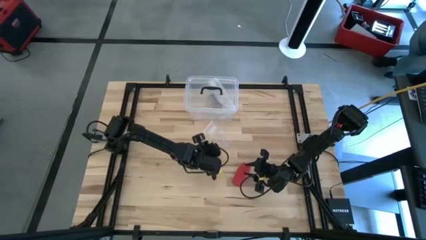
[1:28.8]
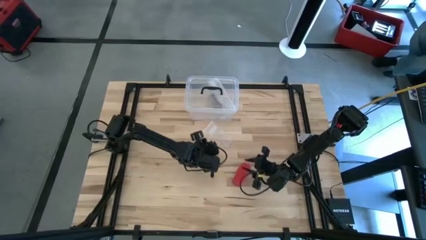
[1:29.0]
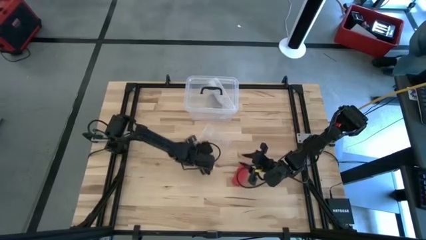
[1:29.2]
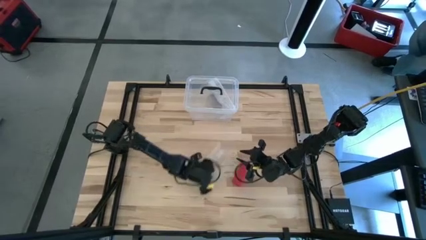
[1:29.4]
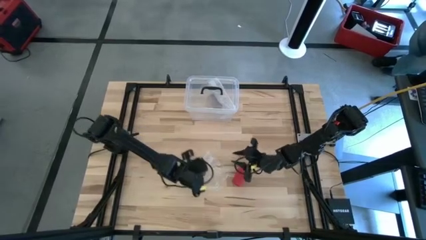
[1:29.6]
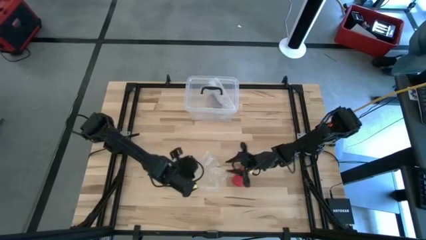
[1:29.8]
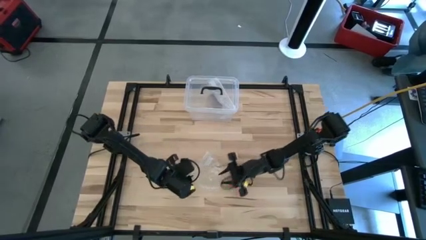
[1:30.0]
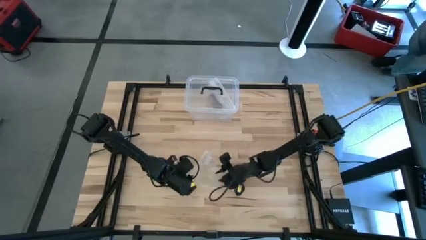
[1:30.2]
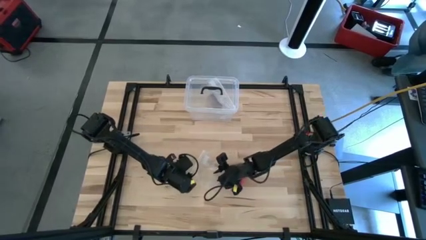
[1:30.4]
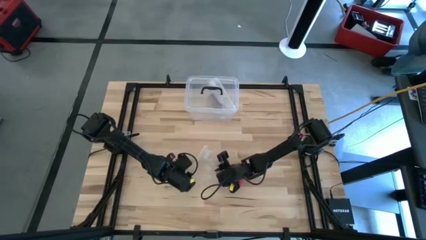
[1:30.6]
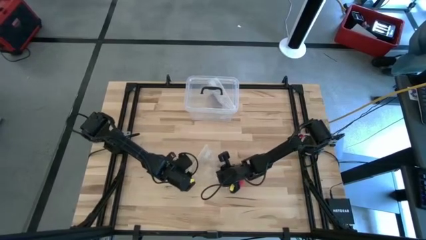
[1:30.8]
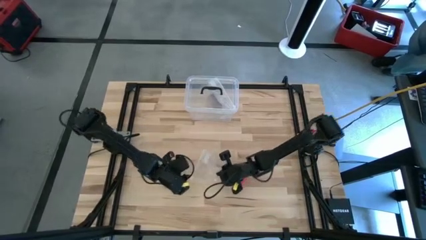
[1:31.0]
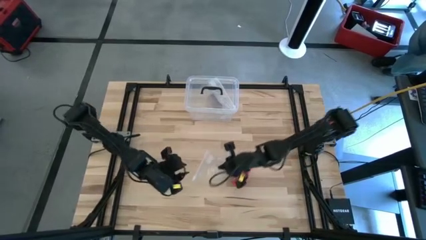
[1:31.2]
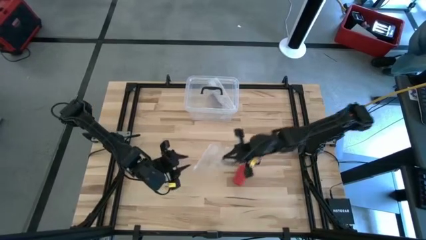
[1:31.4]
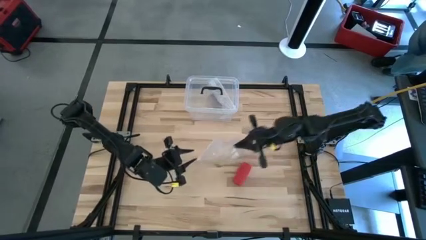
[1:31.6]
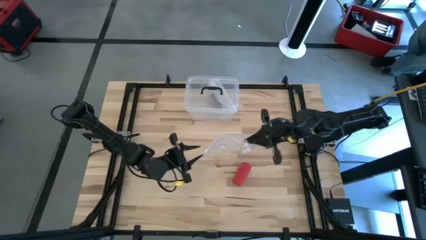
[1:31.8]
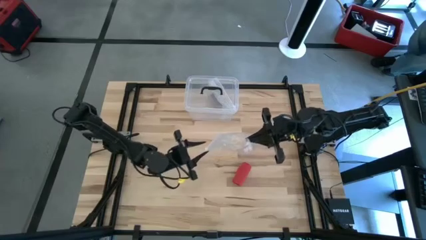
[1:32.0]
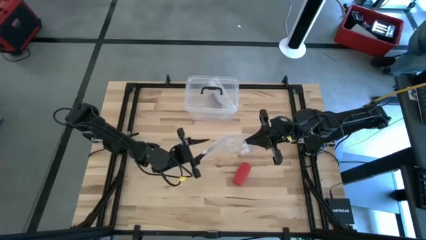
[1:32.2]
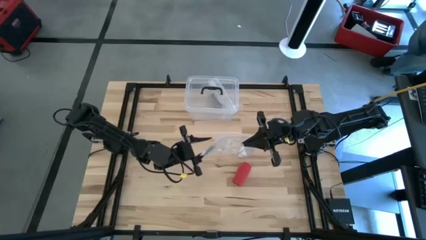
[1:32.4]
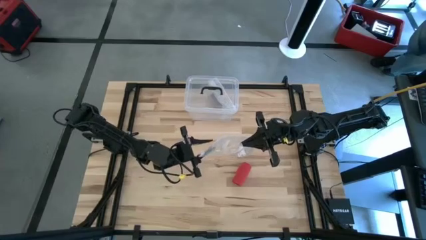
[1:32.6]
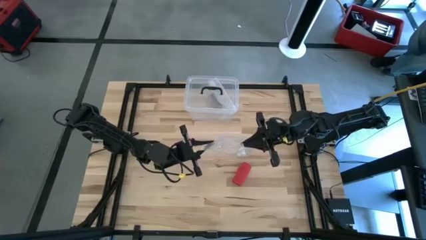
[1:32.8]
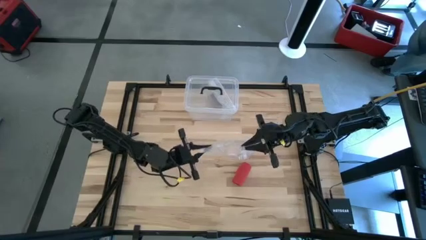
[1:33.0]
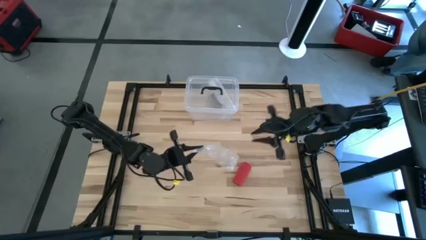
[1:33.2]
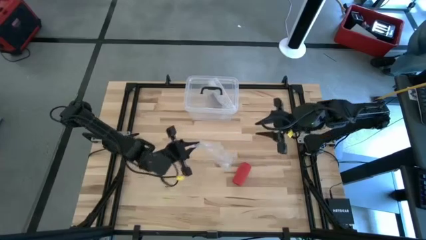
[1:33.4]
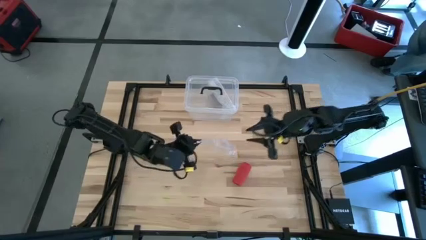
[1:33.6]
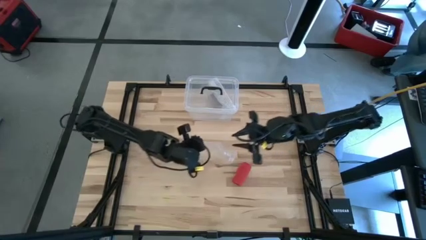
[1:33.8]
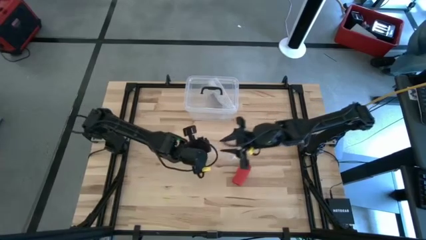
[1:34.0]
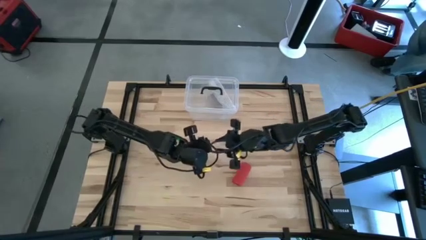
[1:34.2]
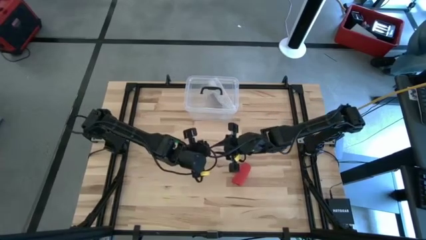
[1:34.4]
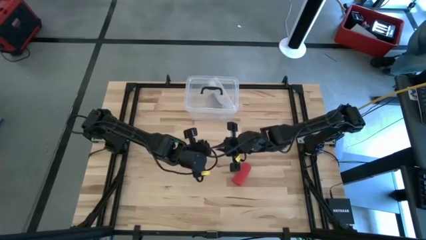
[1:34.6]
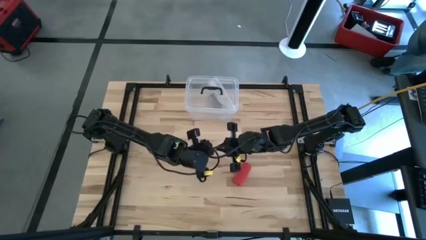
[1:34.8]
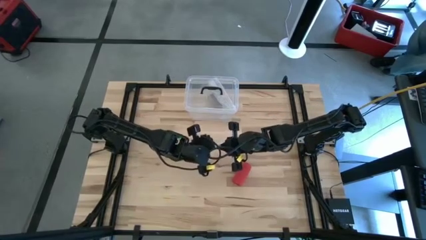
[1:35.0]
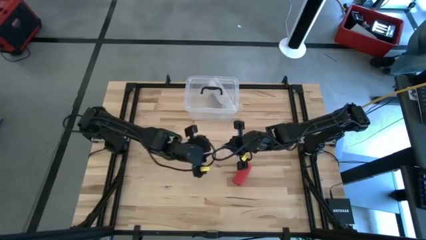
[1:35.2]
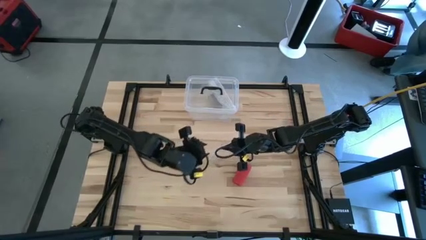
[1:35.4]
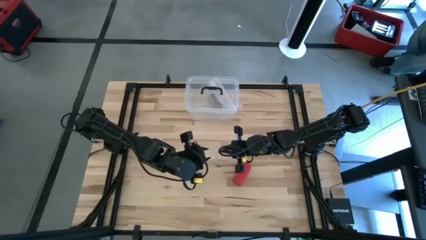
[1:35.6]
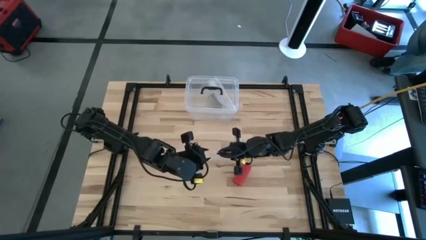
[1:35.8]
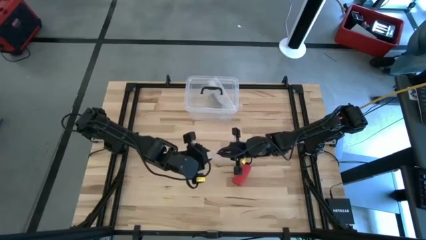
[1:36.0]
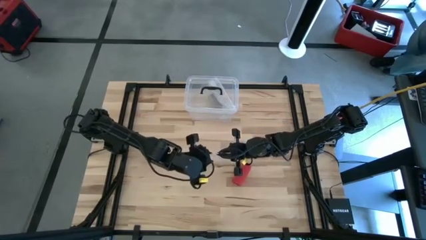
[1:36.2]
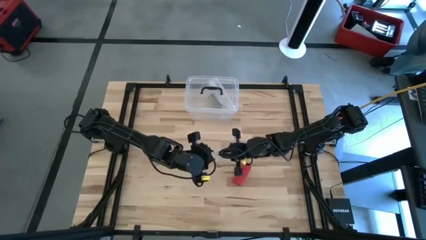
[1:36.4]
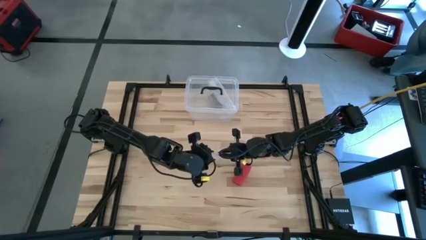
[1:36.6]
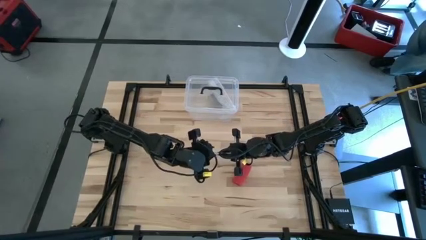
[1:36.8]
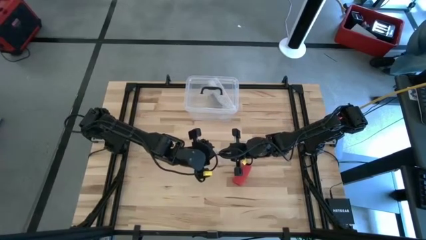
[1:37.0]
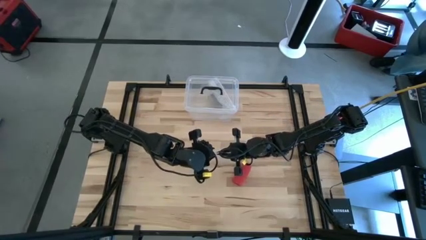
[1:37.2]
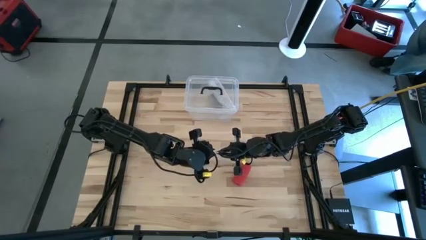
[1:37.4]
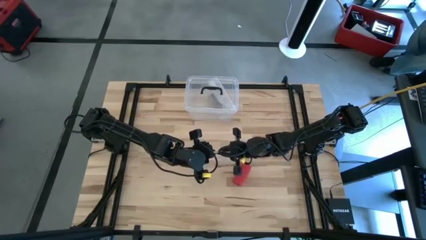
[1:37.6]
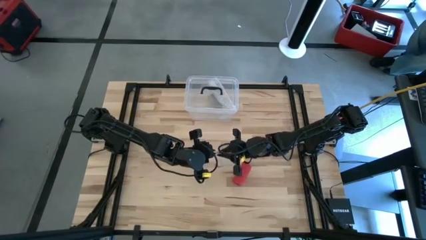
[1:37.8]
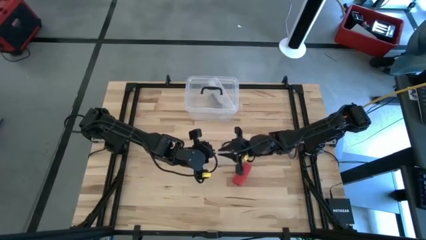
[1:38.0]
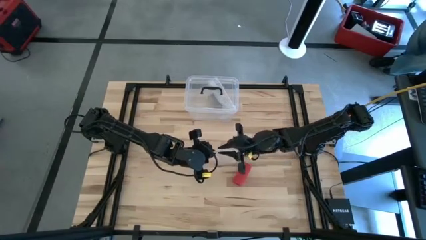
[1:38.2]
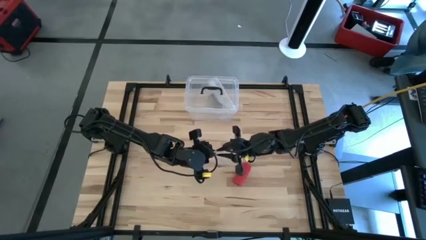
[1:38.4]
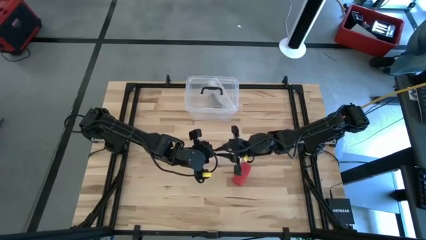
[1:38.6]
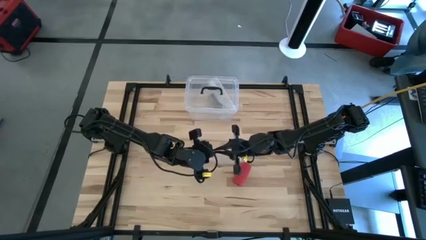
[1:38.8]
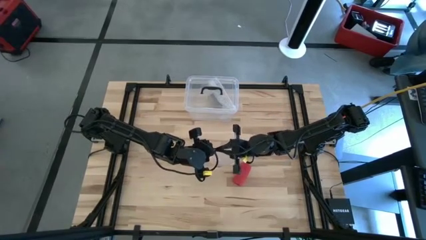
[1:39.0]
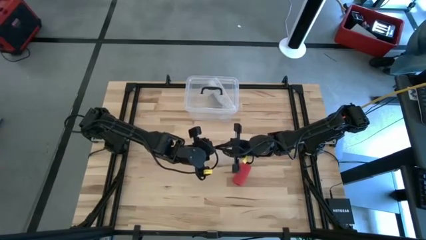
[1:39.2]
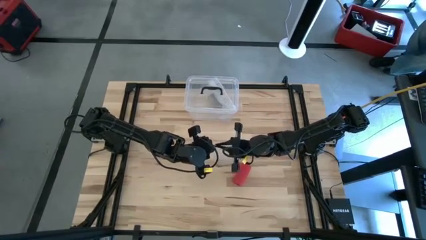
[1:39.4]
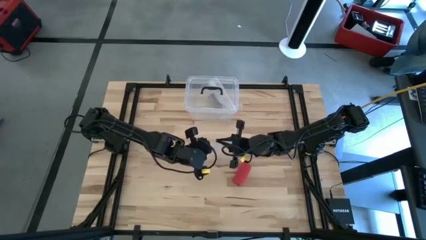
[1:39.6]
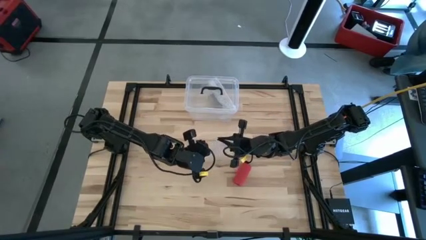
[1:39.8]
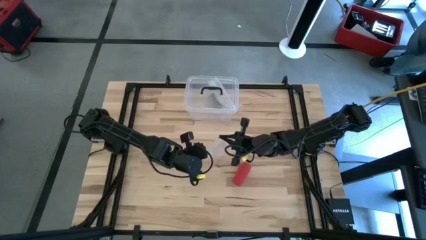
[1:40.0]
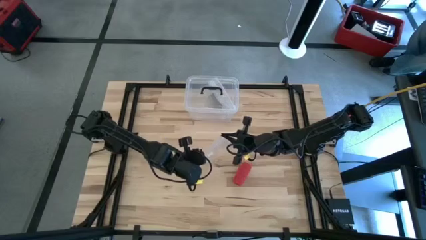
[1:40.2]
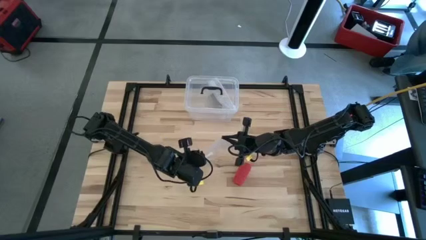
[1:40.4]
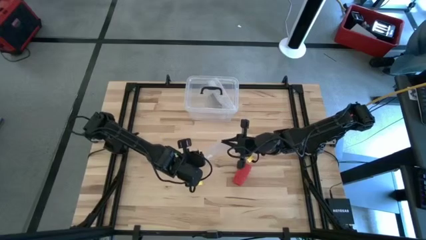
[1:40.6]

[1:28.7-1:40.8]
Task: Roll bandage
Open the transparent zip bag

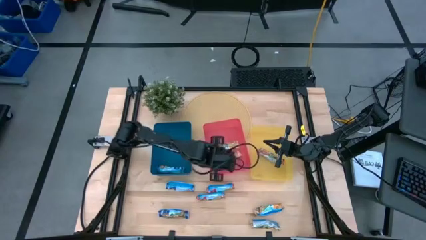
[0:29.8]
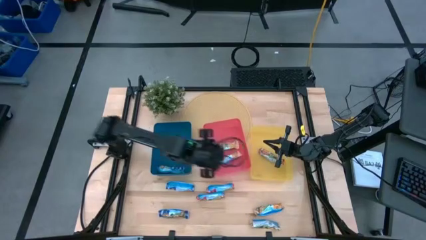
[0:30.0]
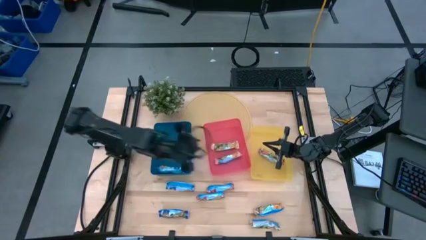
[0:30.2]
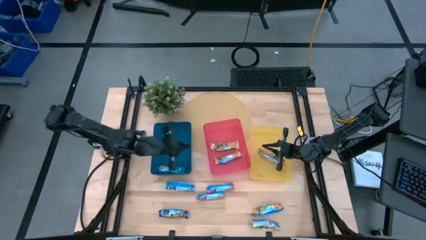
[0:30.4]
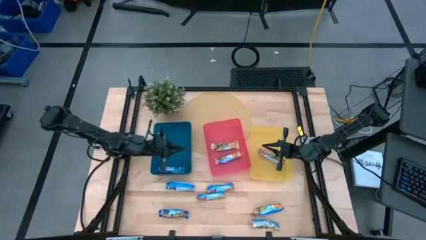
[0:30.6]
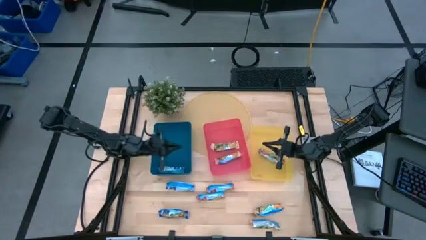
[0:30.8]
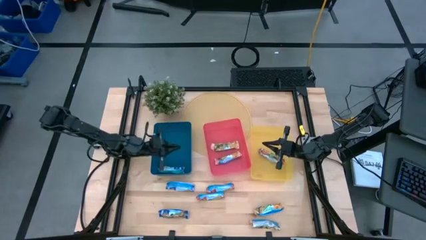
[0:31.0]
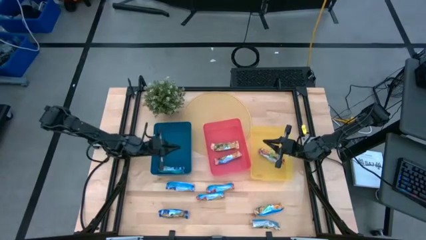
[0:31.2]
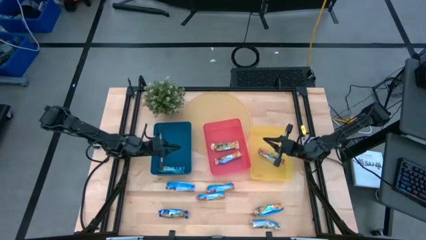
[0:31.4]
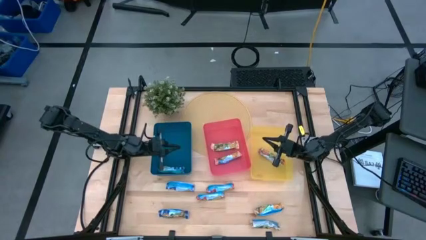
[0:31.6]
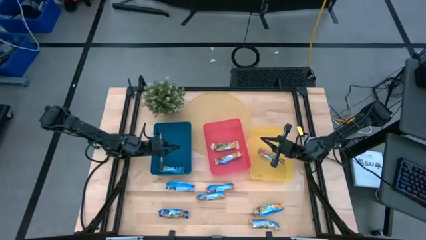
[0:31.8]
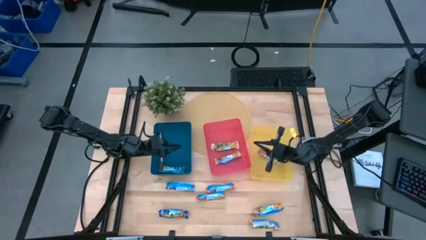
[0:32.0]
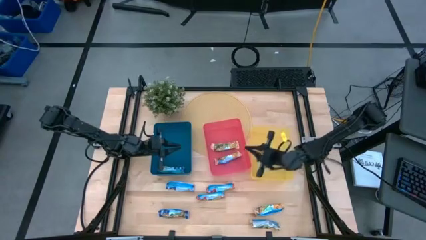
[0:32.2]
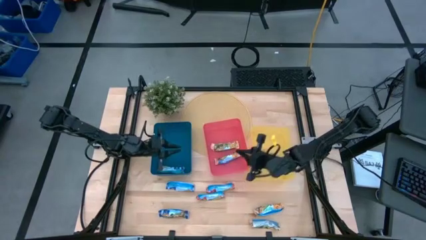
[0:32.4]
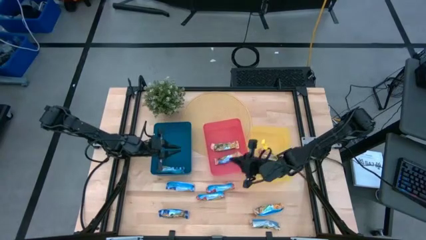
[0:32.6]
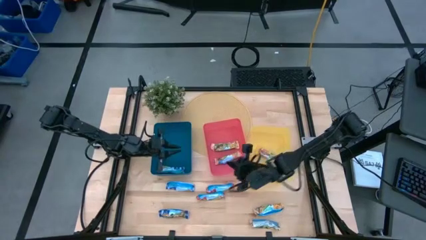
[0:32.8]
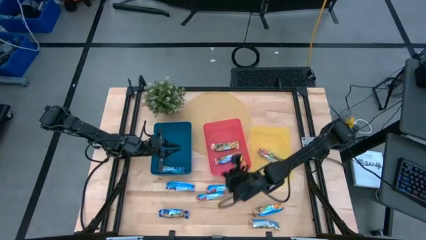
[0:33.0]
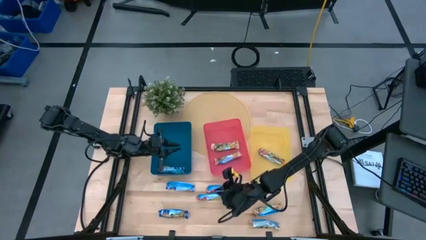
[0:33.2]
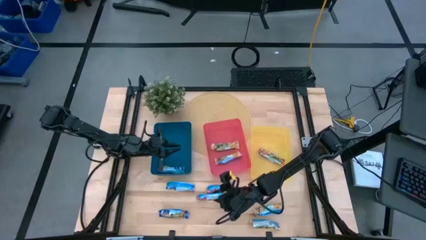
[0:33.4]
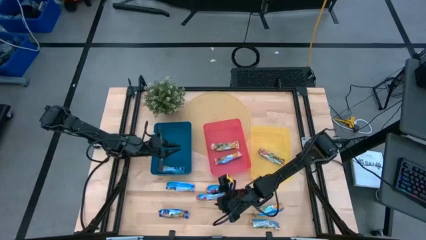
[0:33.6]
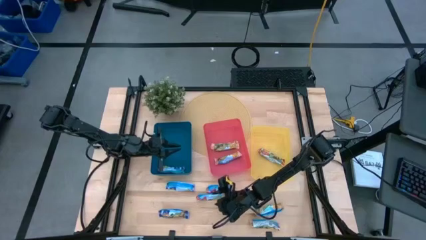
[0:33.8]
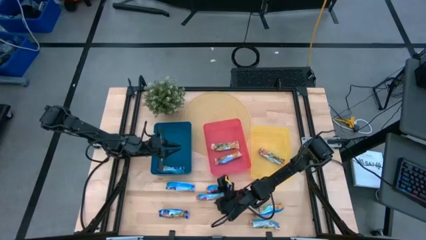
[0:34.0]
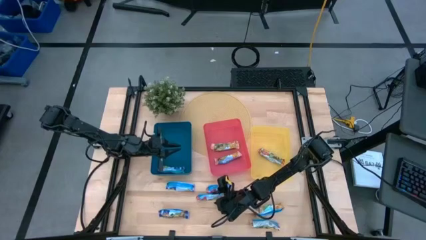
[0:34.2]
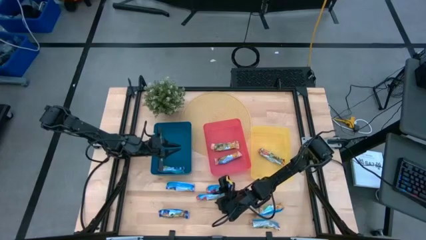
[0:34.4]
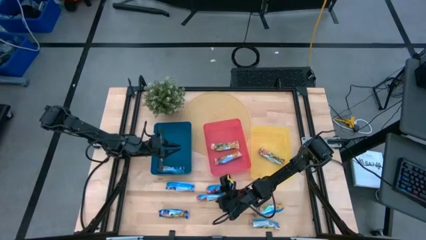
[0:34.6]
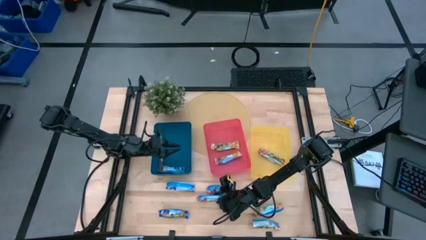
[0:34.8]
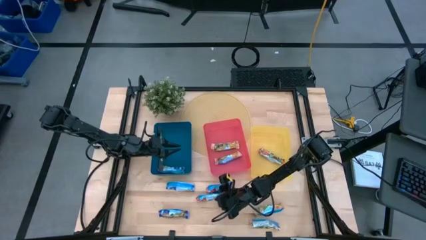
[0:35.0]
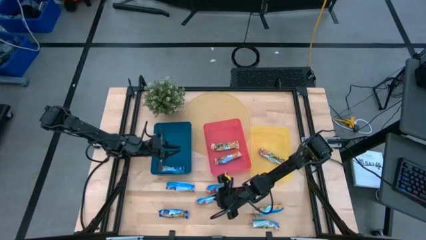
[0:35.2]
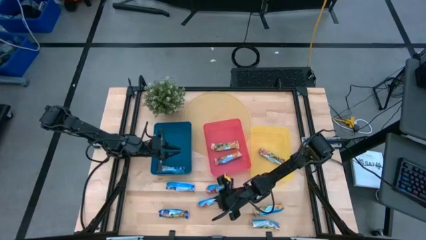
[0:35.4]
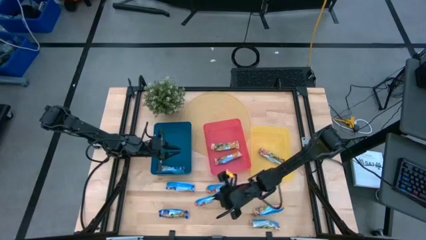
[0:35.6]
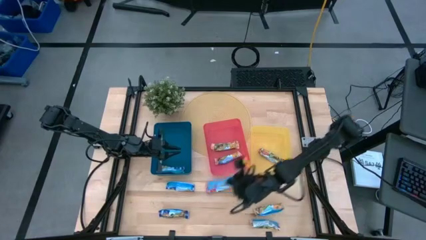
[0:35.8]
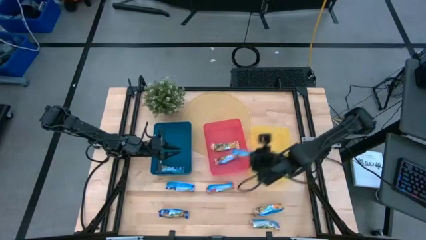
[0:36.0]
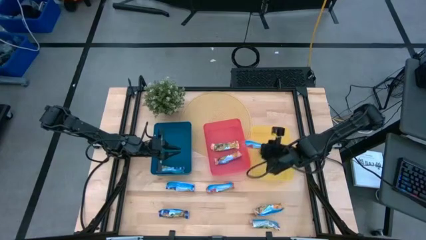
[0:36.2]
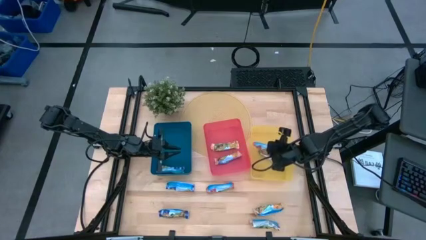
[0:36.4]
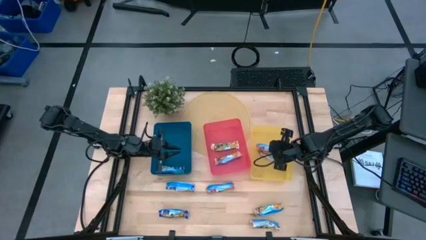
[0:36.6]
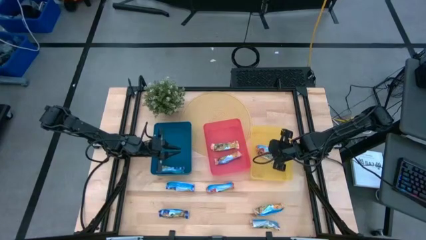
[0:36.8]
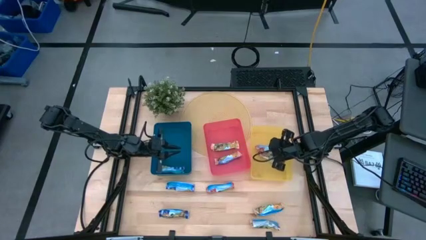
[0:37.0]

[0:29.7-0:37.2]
Task: Pick and place Granola Bars by type
Put the red granola bar into the yellow bin
